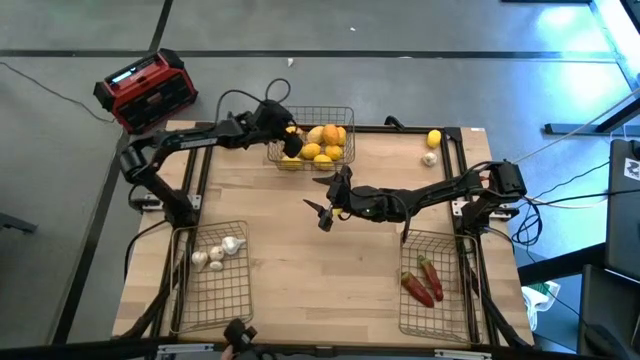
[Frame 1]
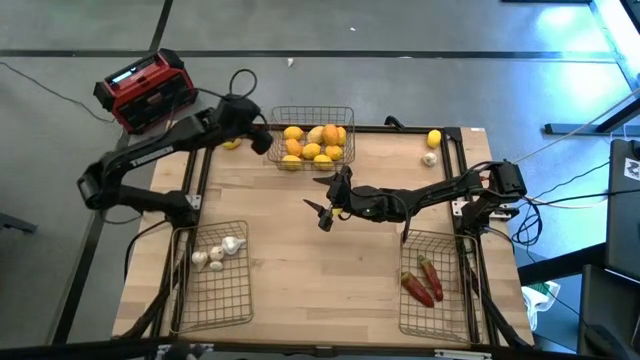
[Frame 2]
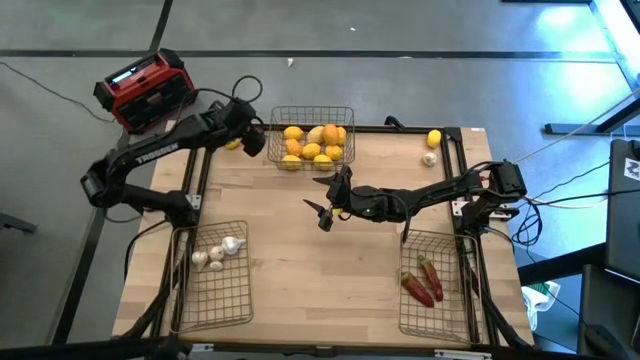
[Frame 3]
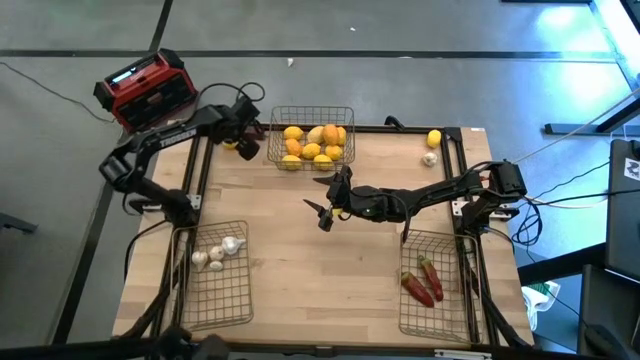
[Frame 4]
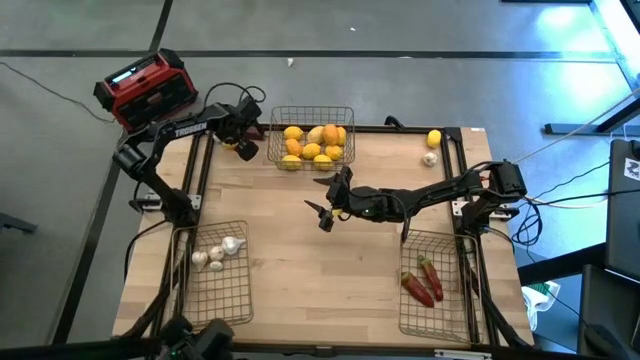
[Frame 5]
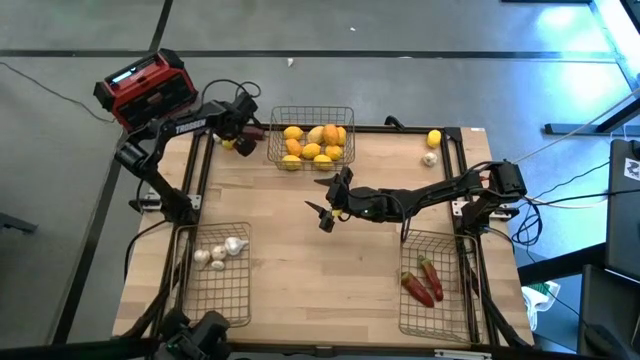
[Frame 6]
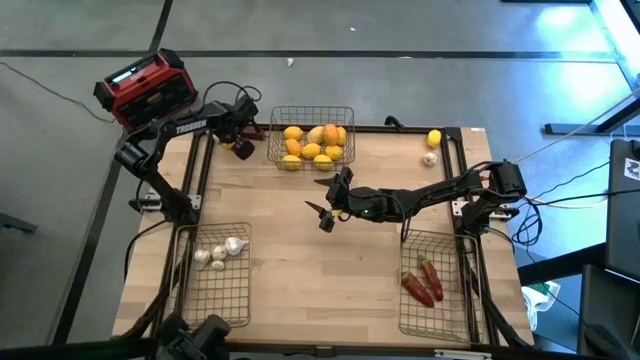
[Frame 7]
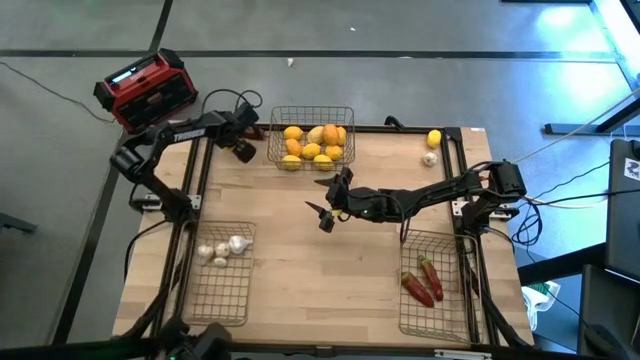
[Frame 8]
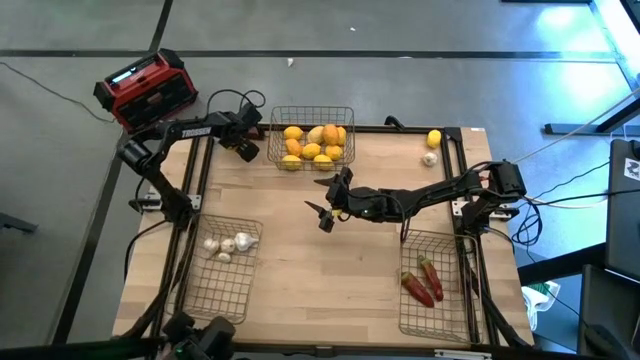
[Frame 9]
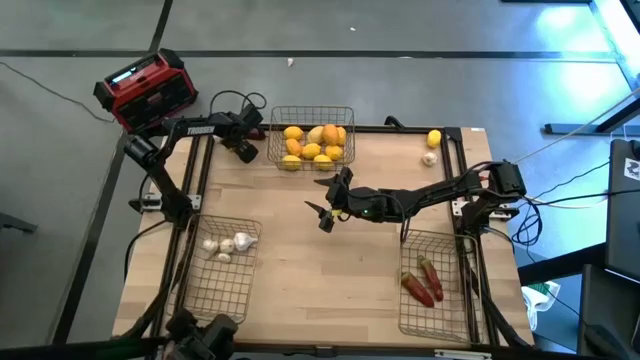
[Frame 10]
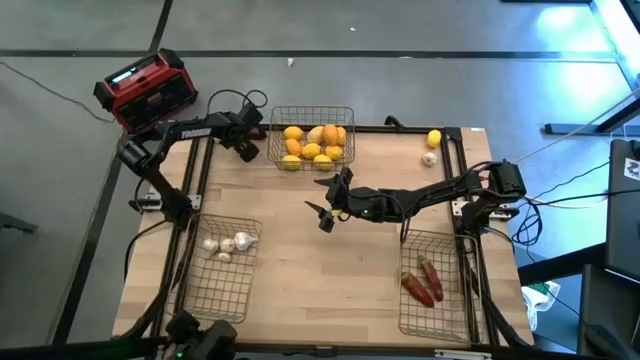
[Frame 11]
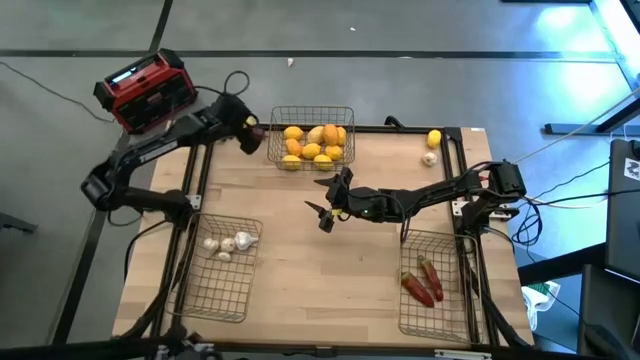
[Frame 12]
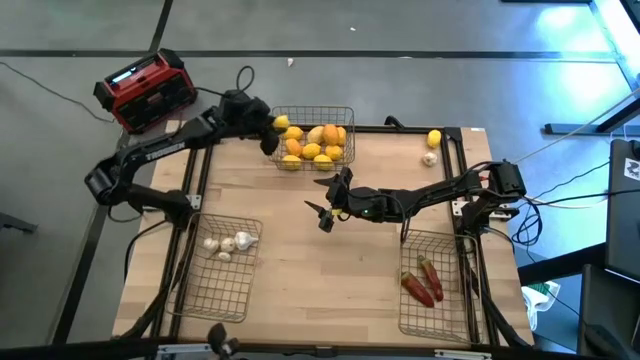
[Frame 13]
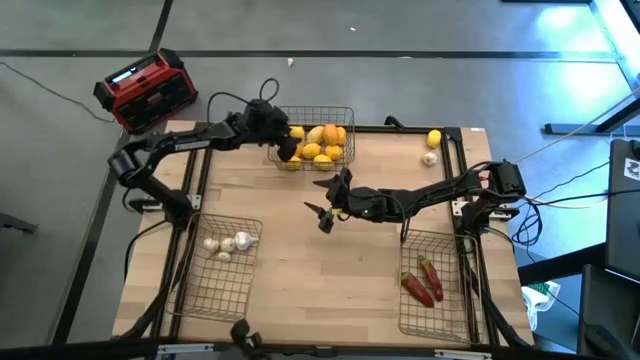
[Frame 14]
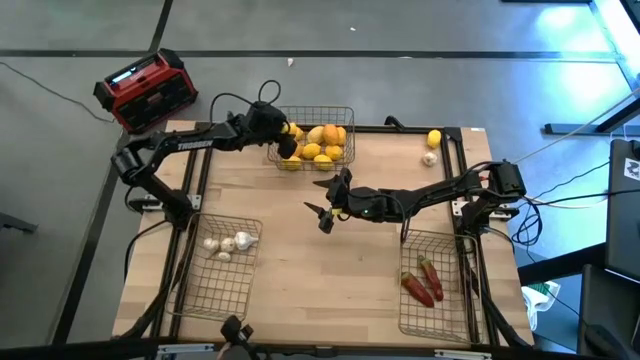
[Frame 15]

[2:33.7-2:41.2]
Task: Sort produce into baskets
Put the lemon into the top wire basket

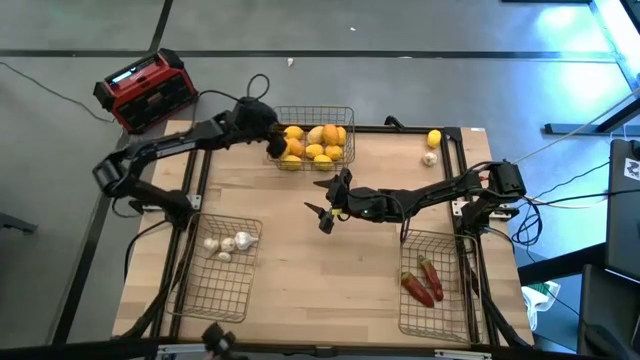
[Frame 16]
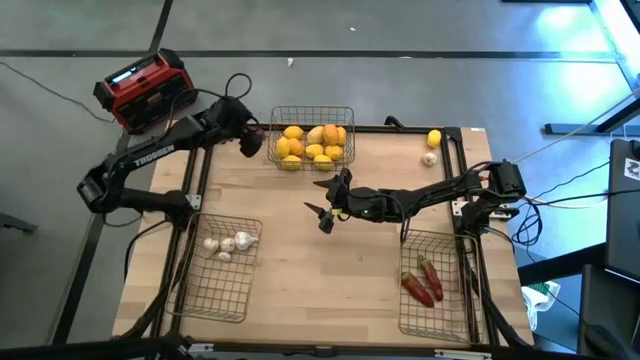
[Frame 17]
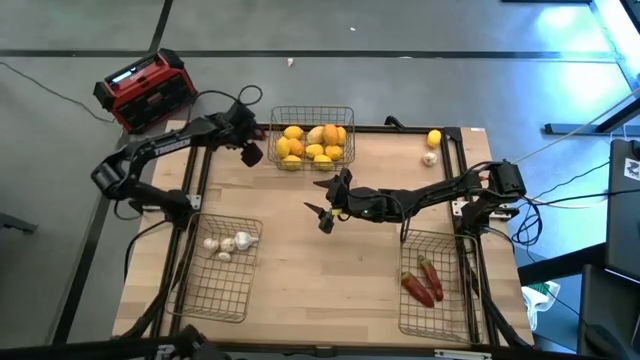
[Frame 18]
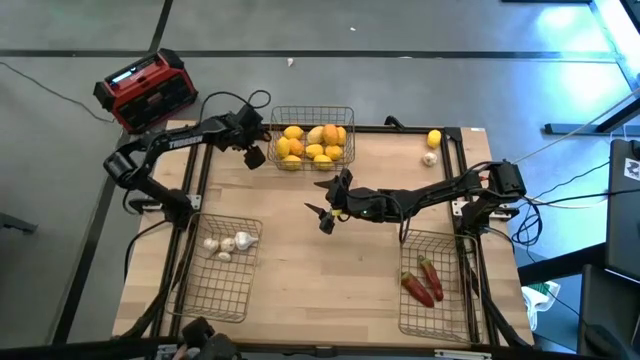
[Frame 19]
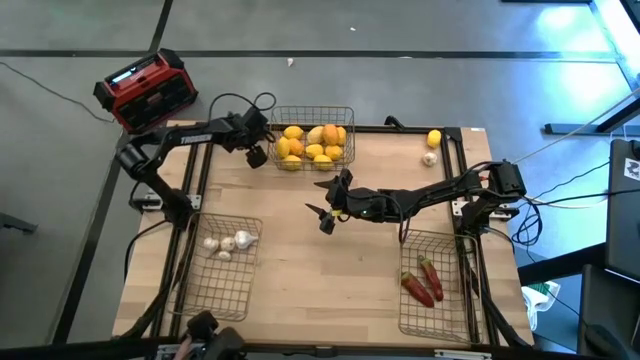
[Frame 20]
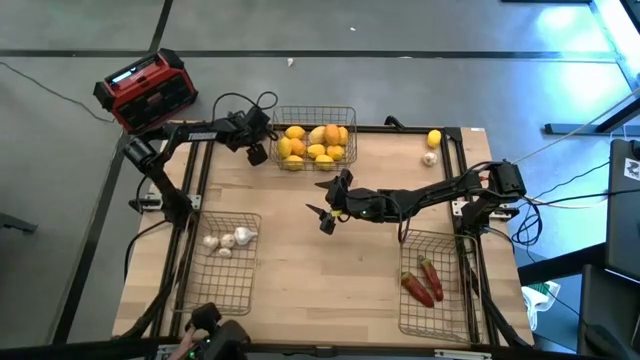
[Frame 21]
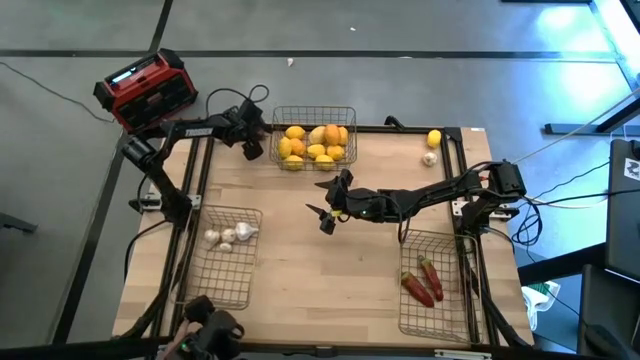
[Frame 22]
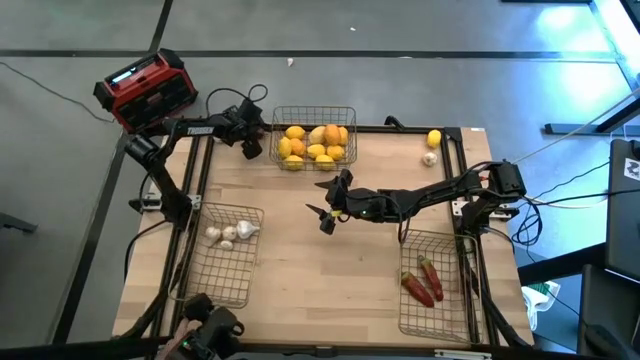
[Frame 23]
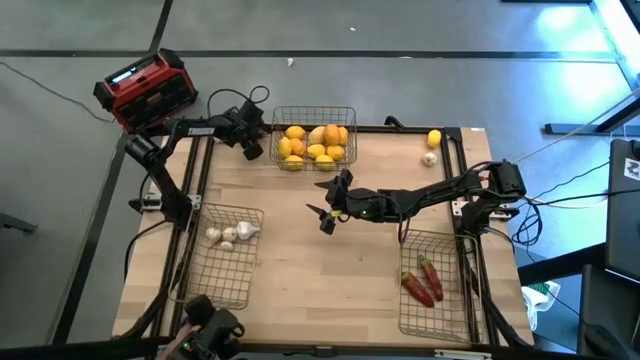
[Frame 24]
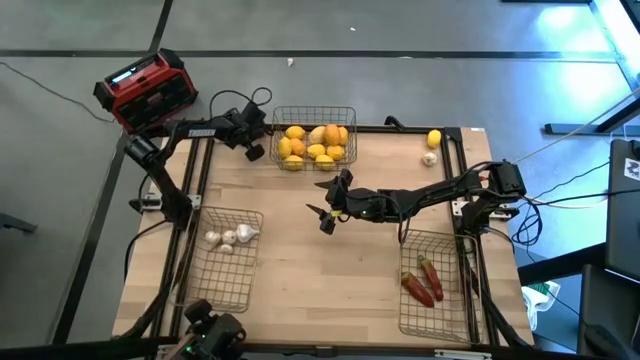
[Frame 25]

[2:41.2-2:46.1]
Put the chili bell pepper into the bottom right wire basket

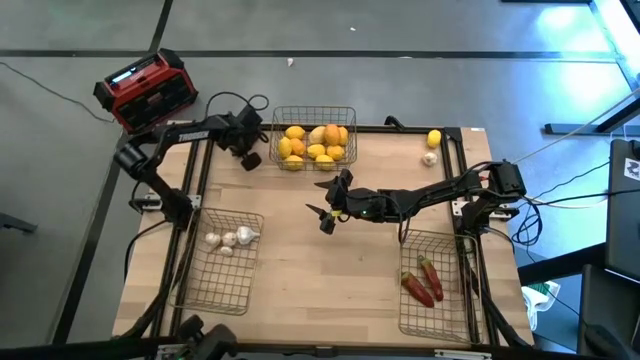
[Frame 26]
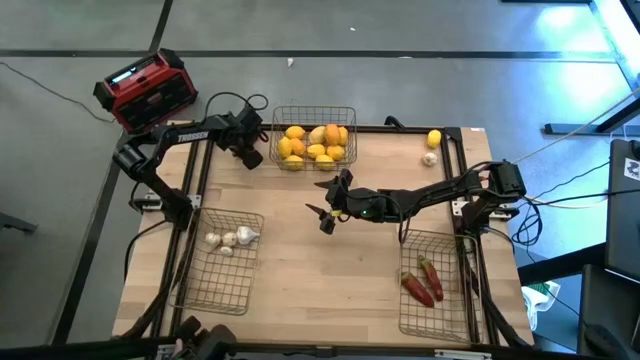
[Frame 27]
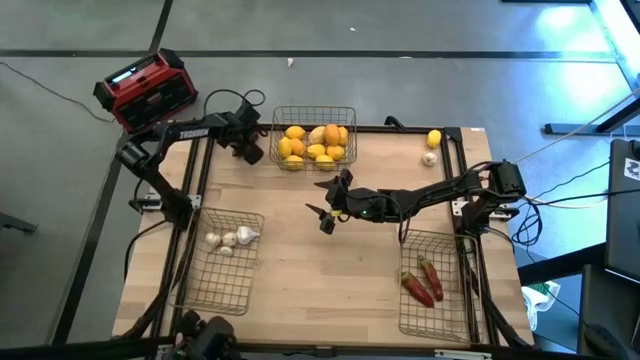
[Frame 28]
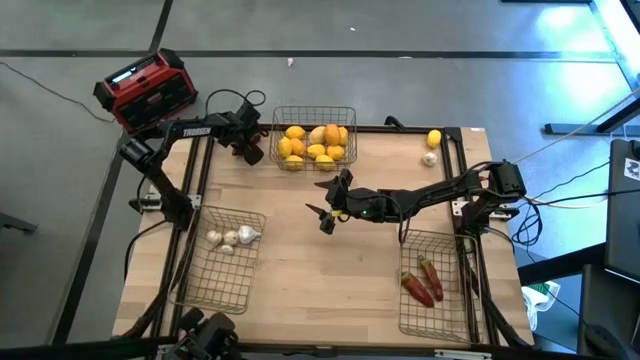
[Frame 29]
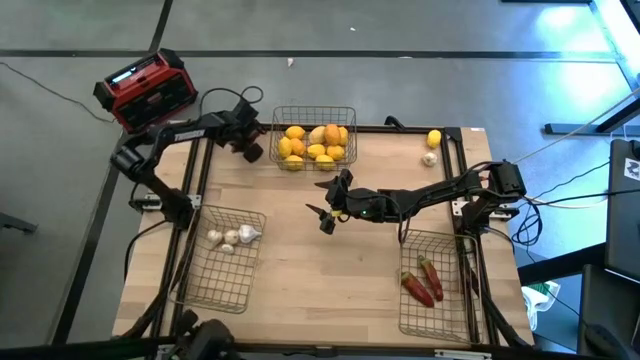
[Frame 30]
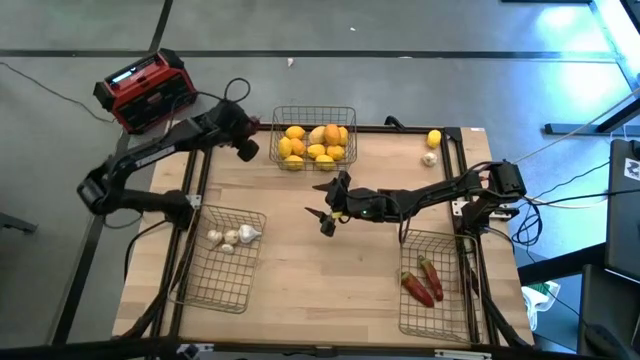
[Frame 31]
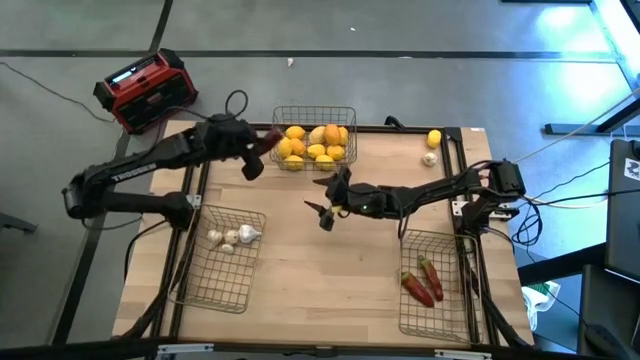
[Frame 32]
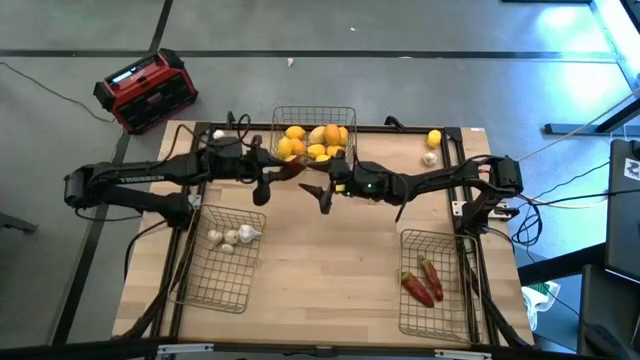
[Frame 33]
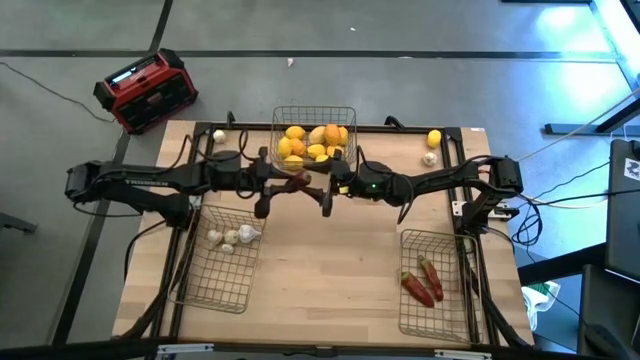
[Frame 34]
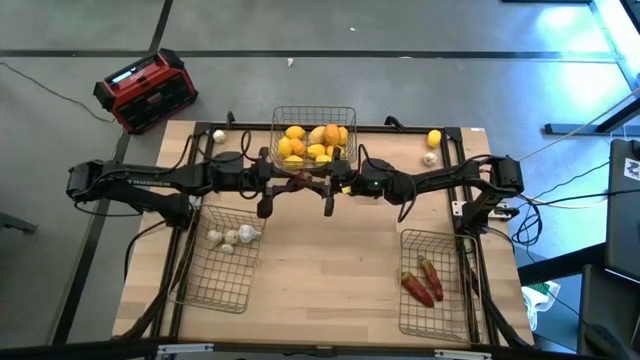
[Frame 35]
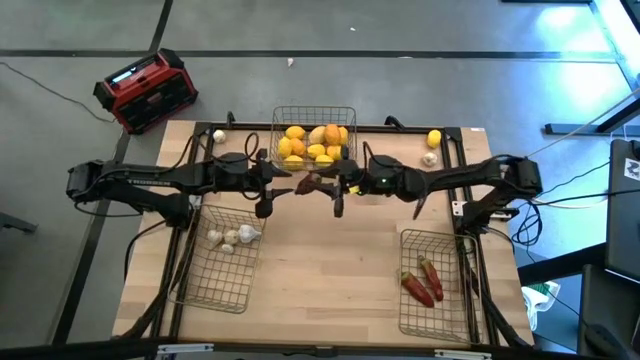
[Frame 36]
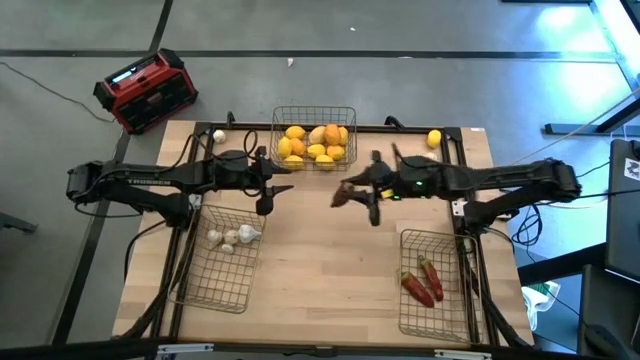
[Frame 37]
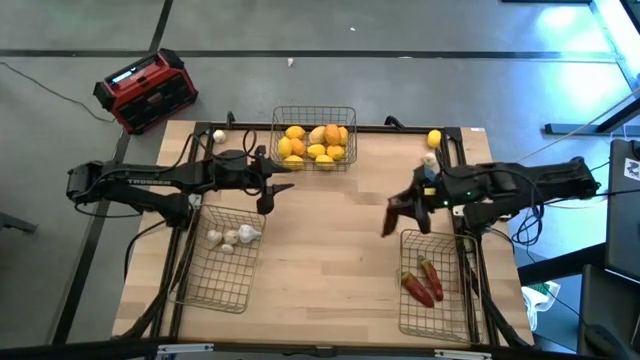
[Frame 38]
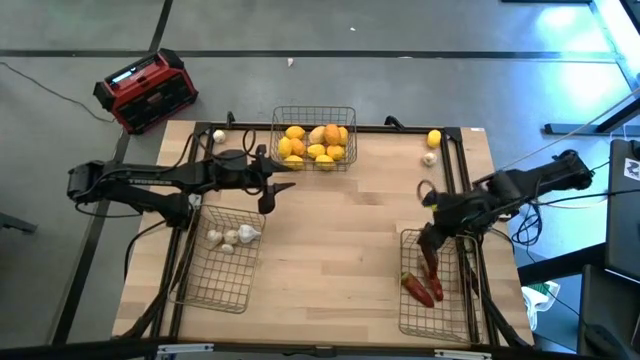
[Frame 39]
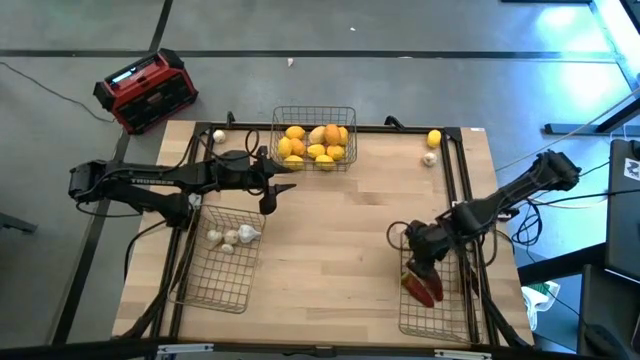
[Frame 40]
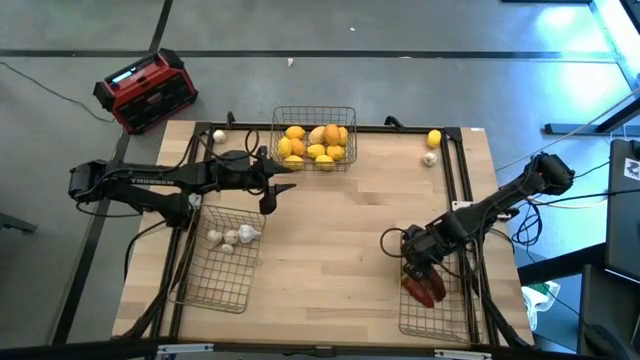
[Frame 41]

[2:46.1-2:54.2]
Put the chili bell pepper into the bottom right wire basket
